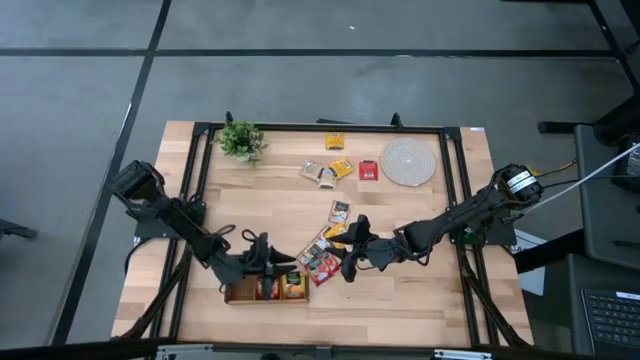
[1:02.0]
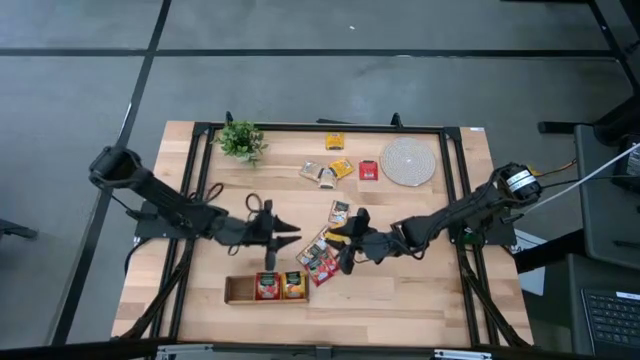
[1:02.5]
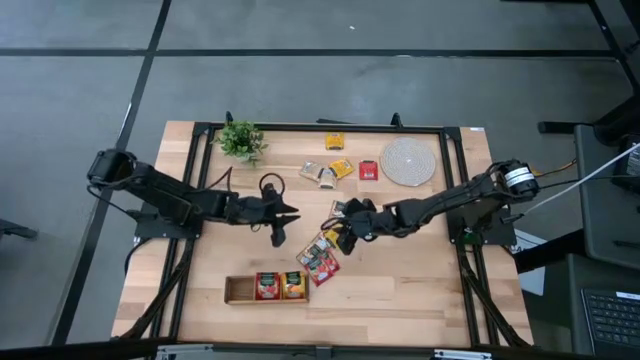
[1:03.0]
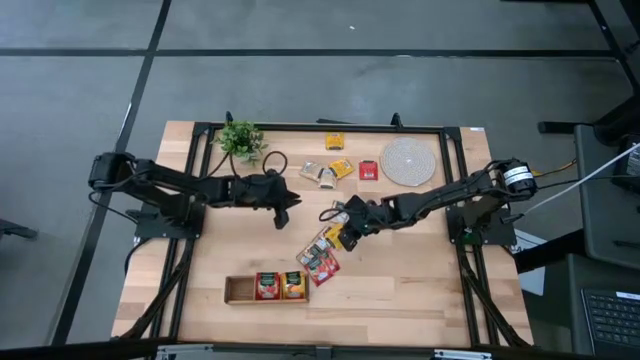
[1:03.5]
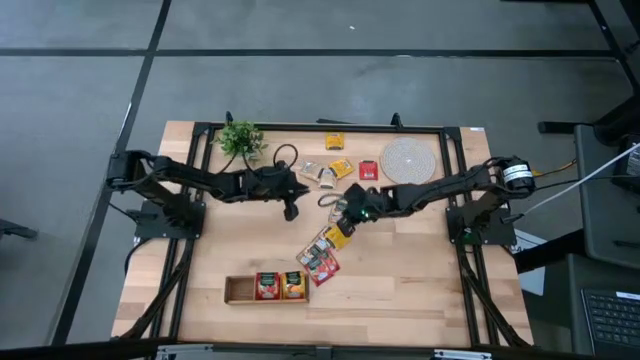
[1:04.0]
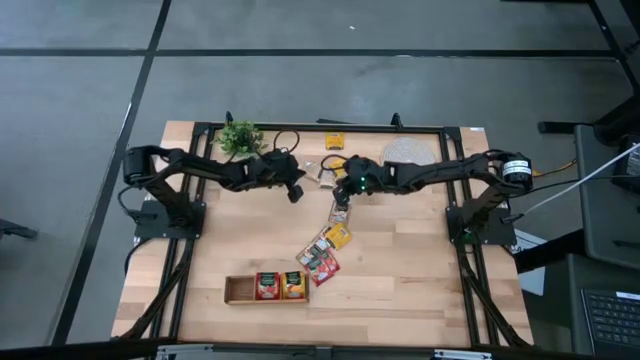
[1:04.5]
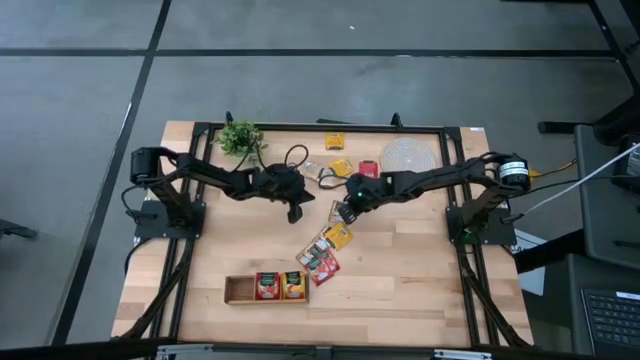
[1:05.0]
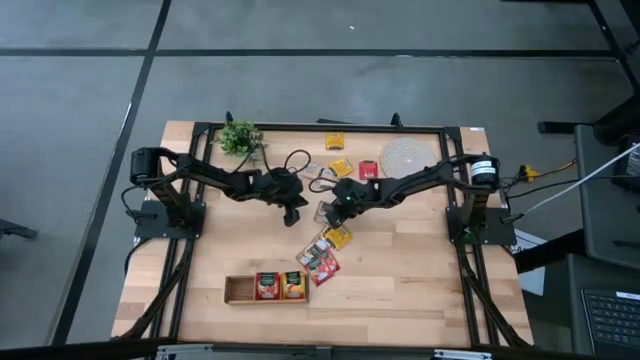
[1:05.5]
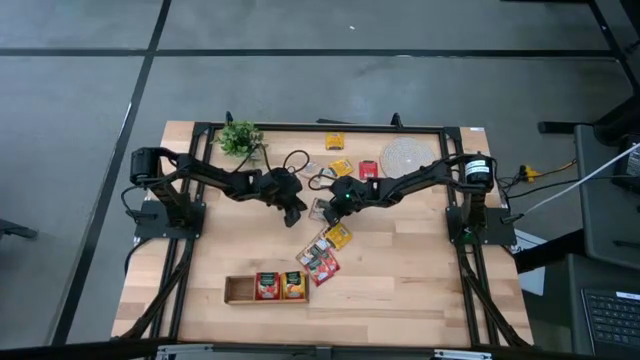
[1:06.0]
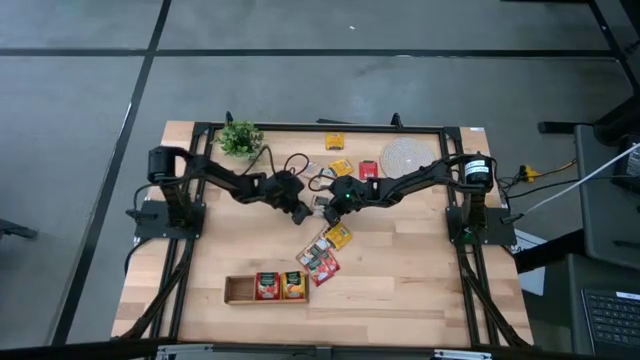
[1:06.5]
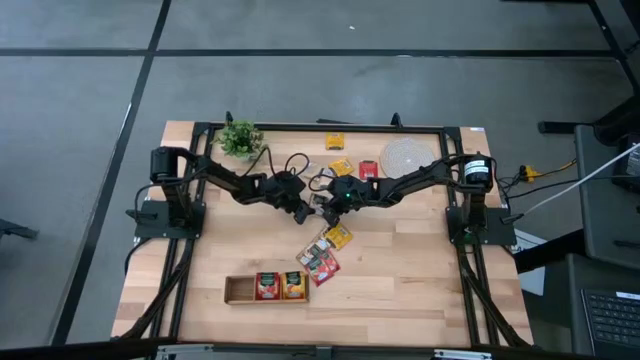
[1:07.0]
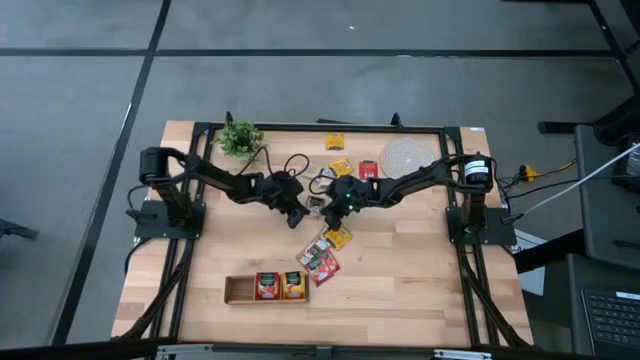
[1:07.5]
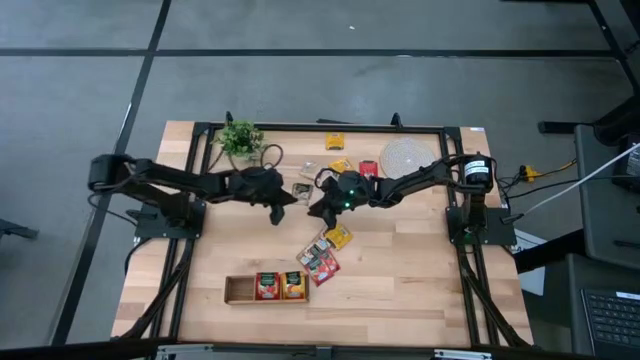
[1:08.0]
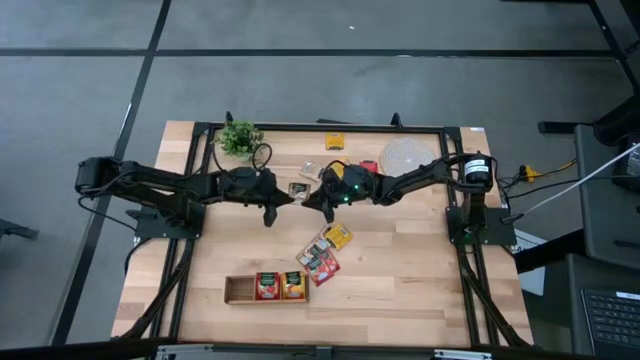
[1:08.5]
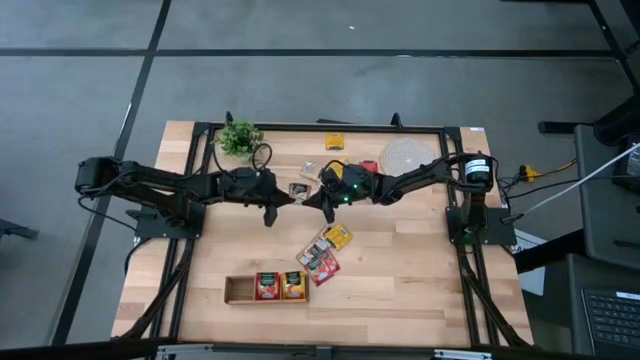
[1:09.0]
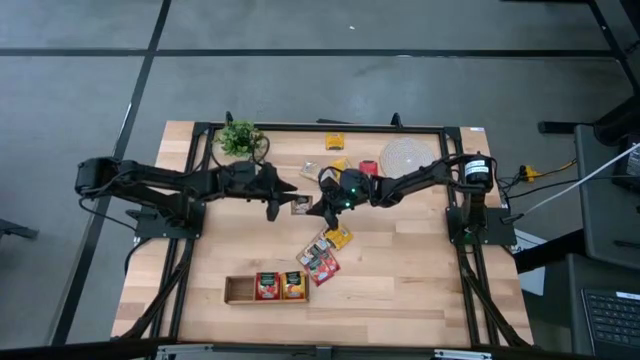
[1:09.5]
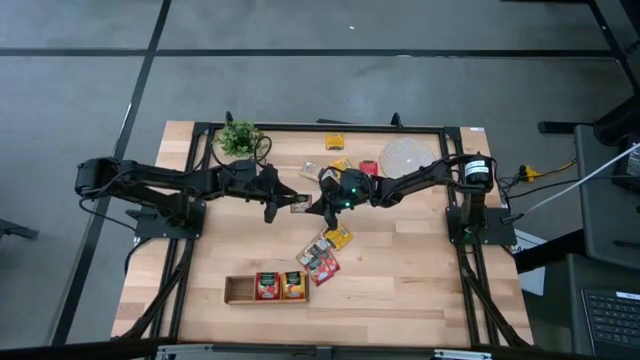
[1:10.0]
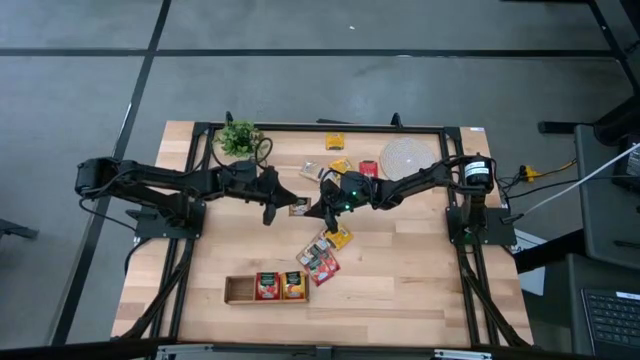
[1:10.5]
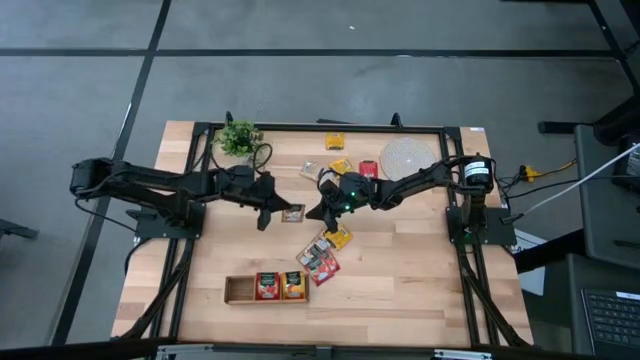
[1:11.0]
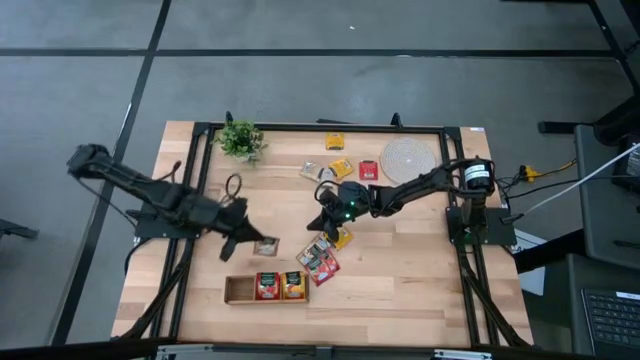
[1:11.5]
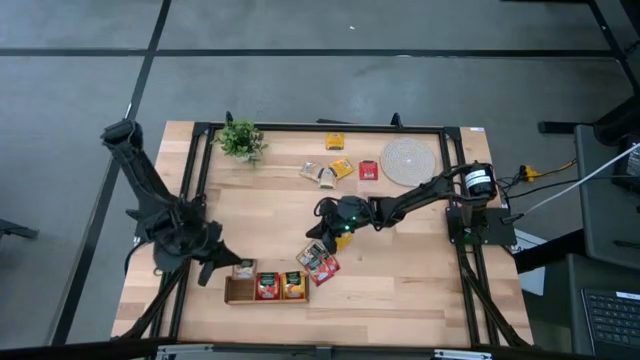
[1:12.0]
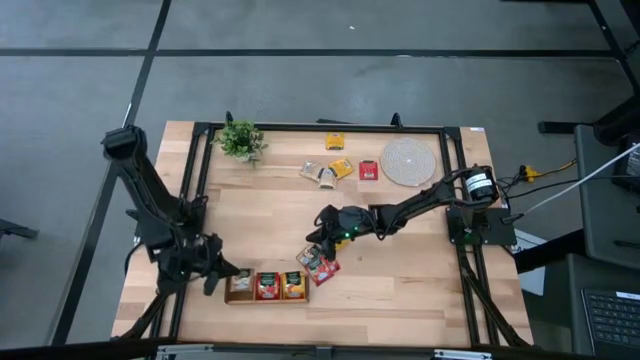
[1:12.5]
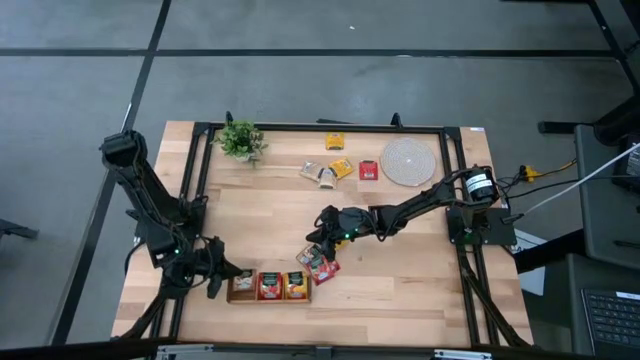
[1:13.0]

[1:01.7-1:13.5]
Task: Pick & Place Tea
Put the brown tea bag into the left section of the wooden organizer

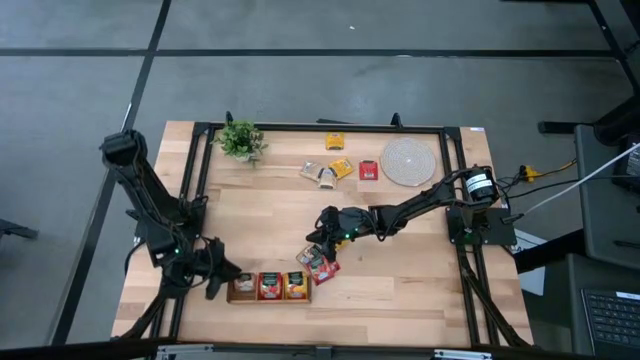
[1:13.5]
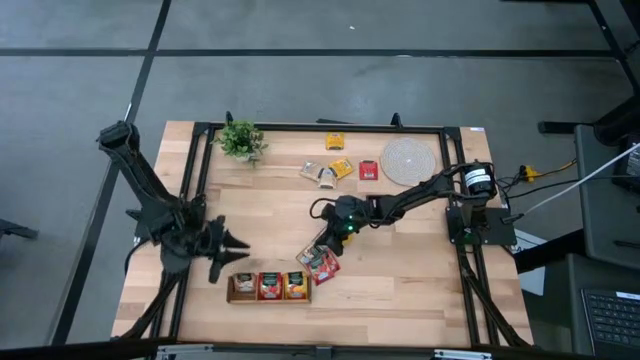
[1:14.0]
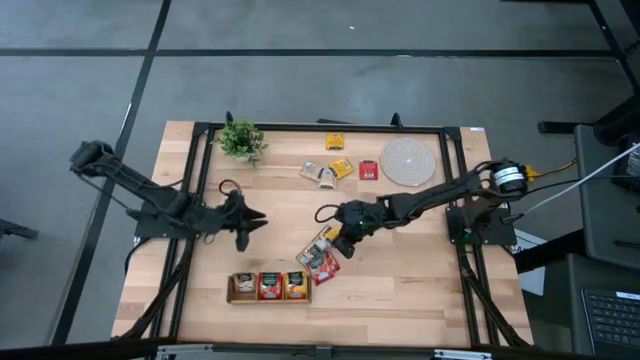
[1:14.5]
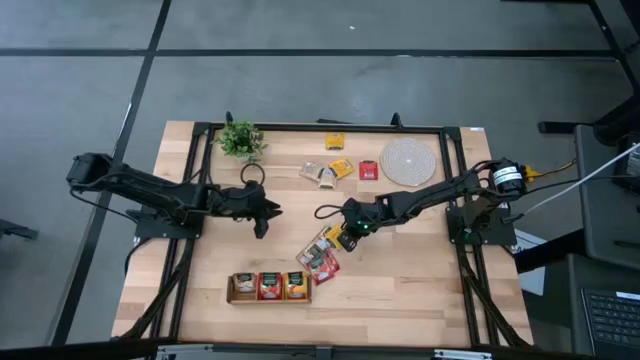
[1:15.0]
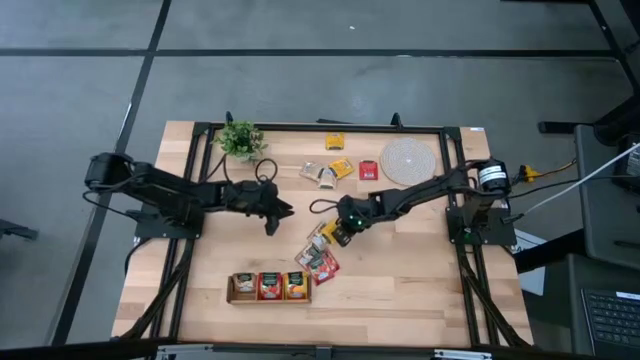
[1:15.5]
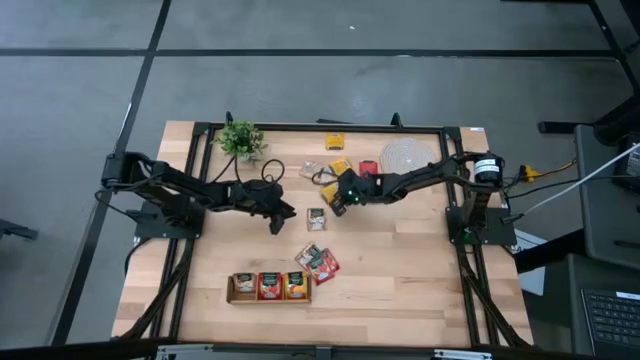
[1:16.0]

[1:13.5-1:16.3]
Move the yellow tea bag to the top of the table

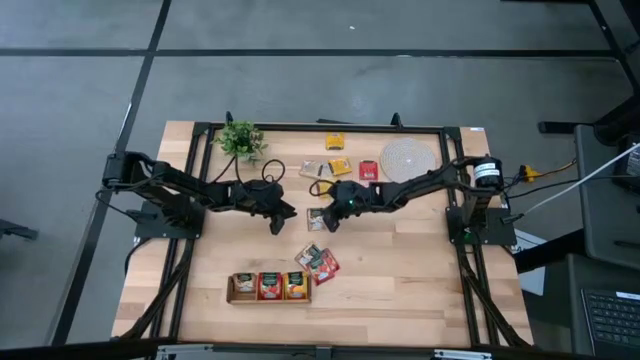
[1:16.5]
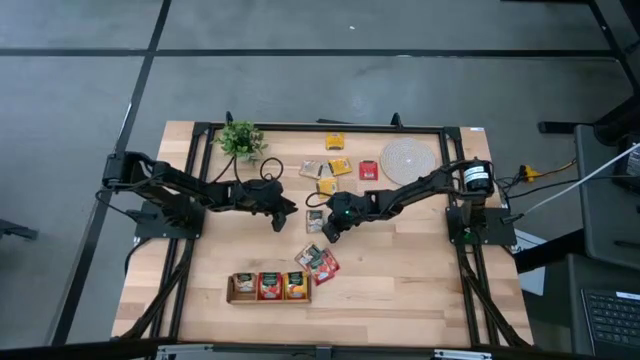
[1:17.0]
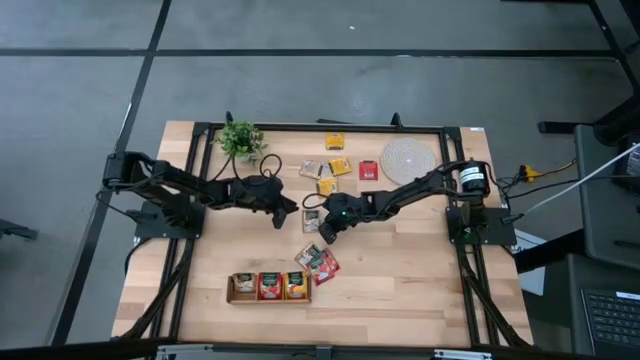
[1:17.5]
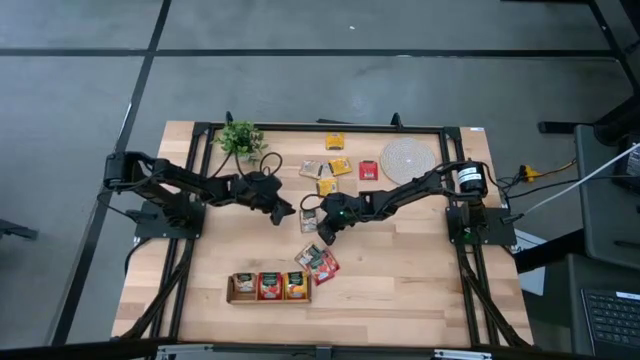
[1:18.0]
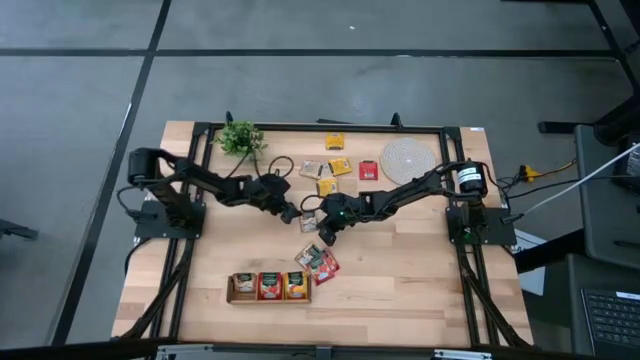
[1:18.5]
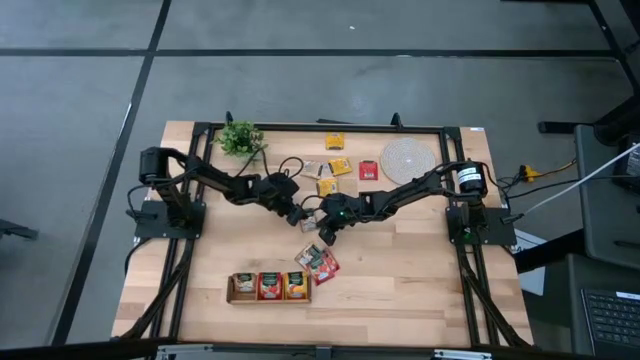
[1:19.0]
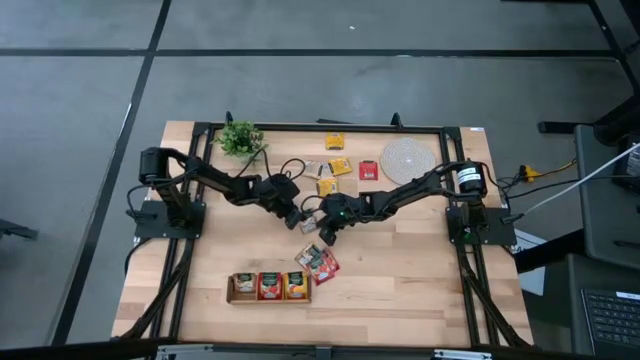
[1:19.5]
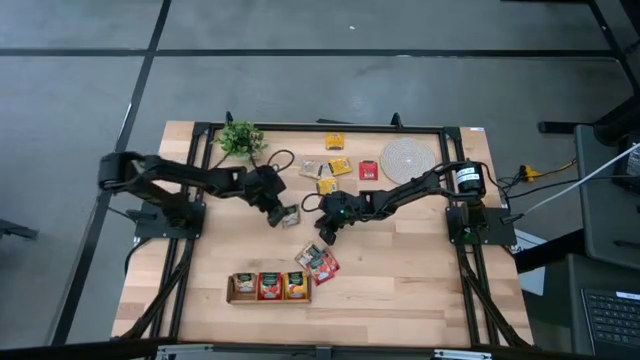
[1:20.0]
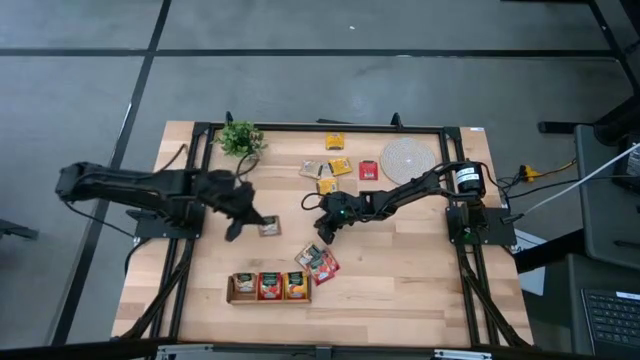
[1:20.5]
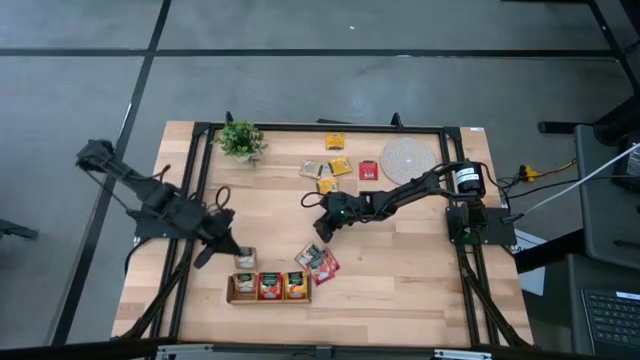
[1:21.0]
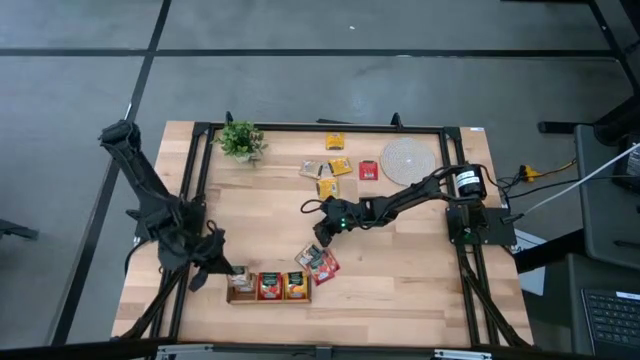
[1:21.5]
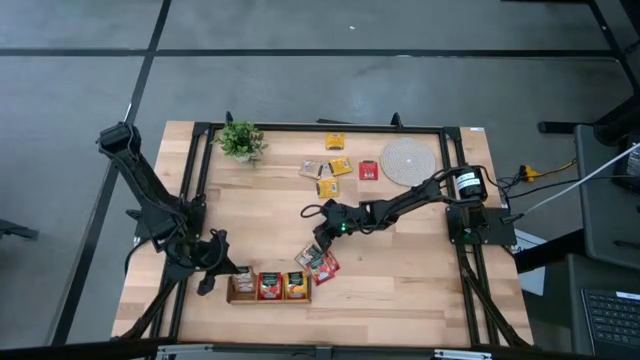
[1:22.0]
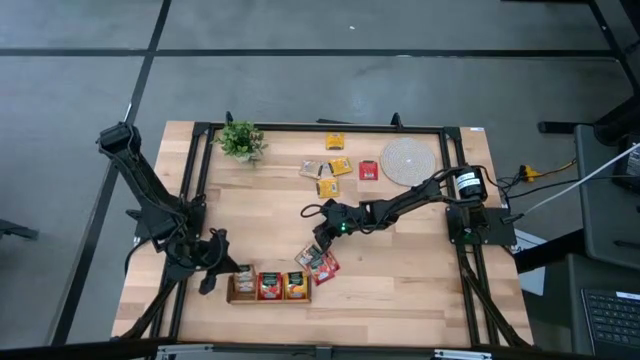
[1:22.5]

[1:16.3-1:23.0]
Put the brown tea bag into the left section of the wooden organizer
